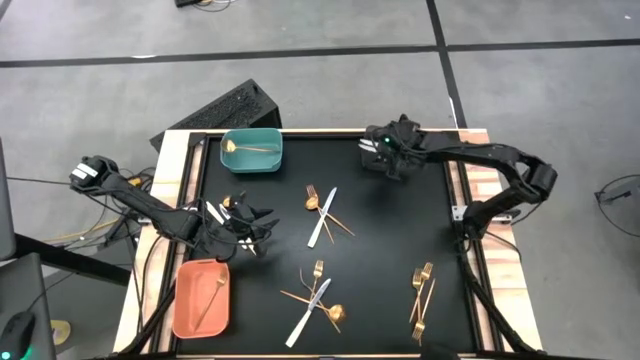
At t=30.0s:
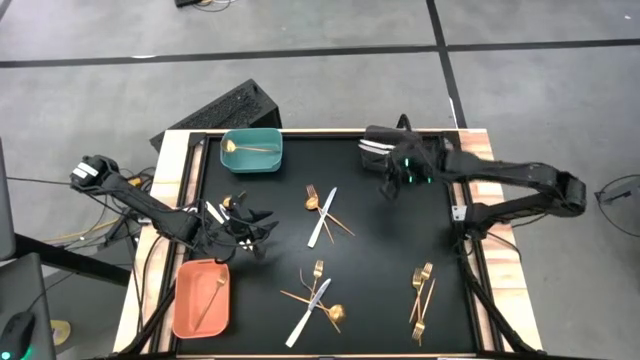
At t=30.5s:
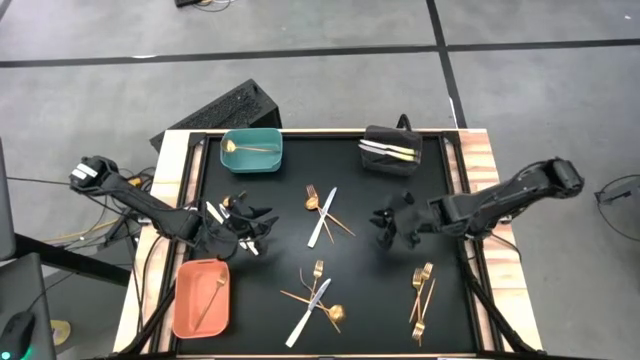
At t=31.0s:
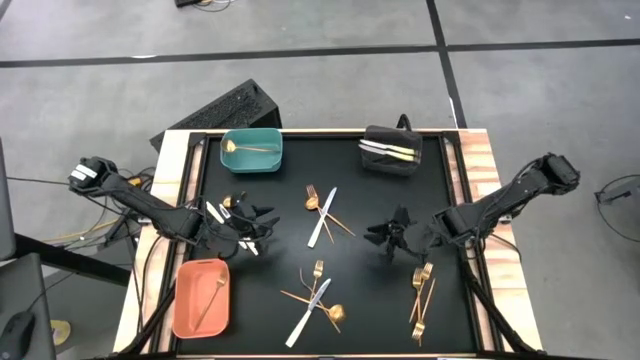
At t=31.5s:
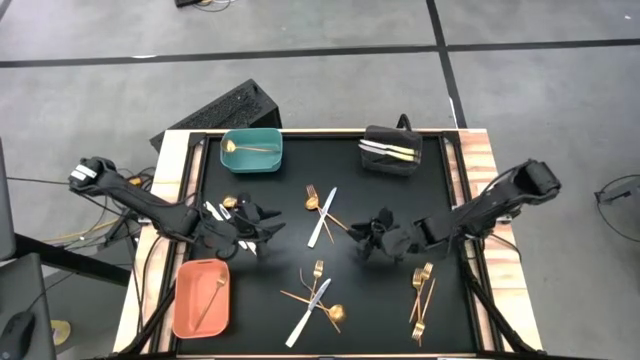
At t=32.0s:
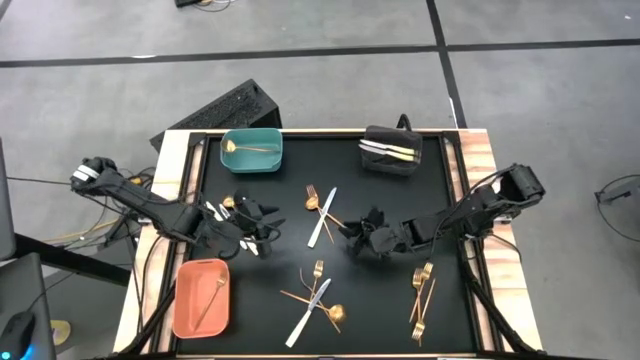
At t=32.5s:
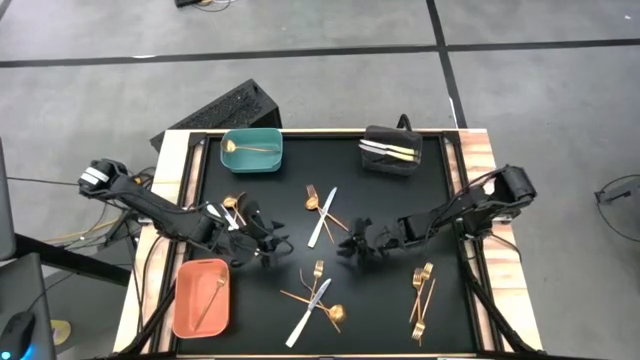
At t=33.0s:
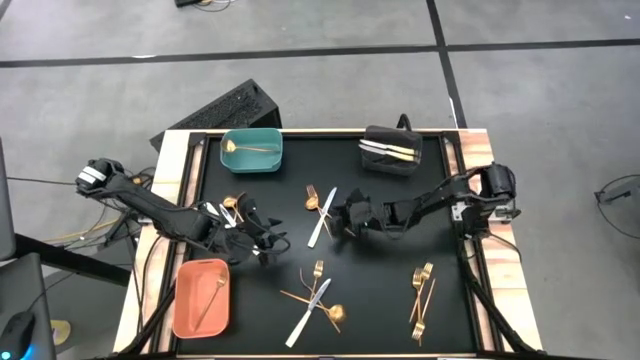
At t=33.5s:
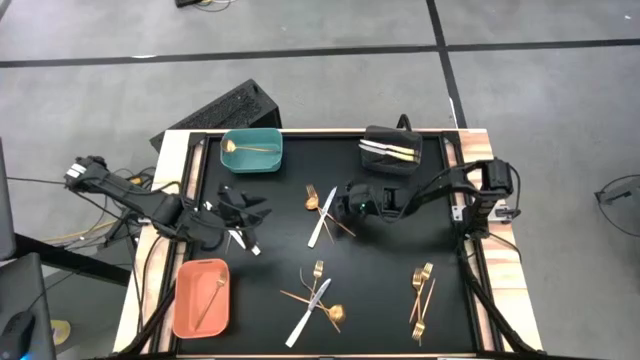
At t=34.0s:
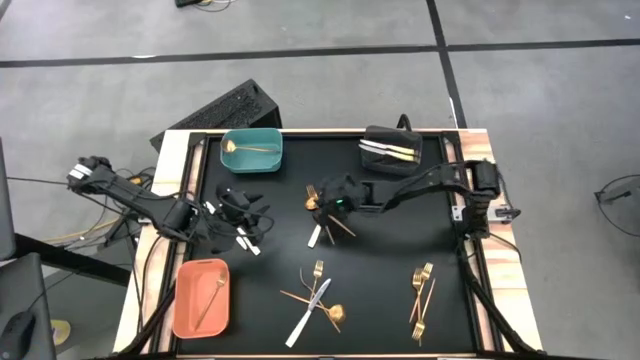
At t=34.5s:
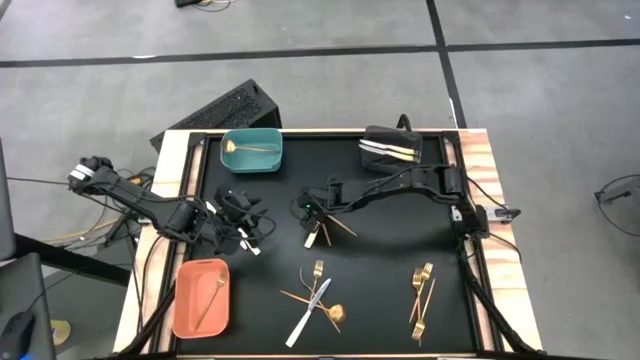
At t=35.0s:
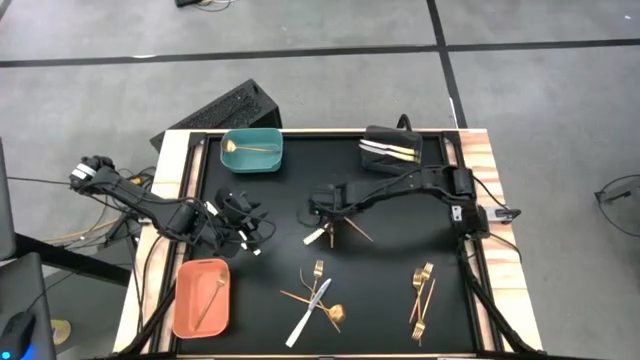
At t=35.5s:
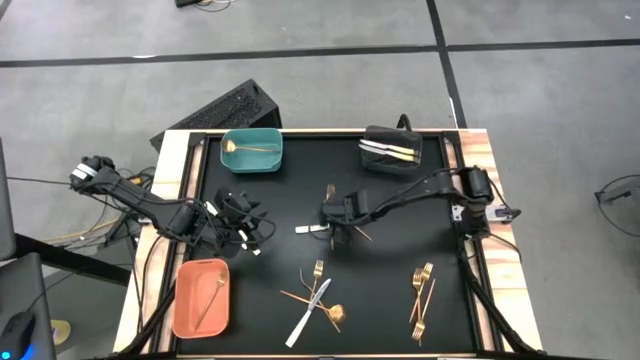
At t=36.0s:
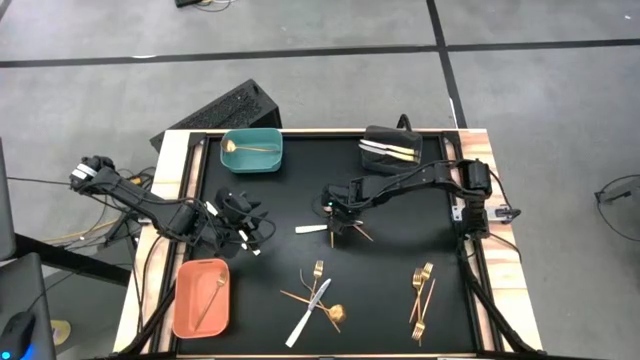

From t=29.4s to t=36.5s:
Task: Sort silverware by color (type)
Put the gold spoon into the green bin

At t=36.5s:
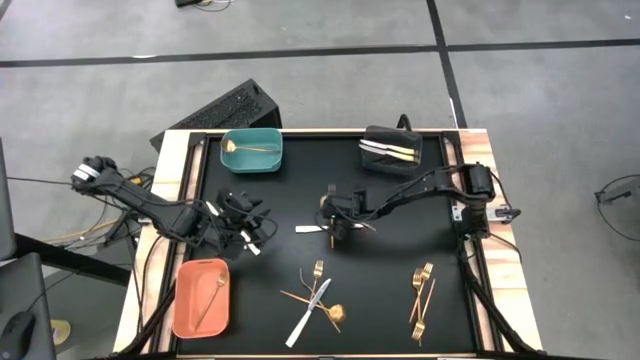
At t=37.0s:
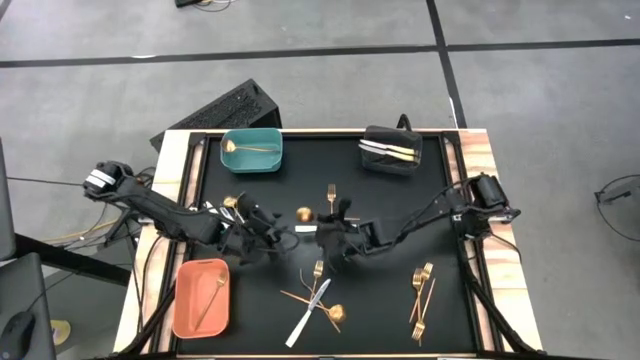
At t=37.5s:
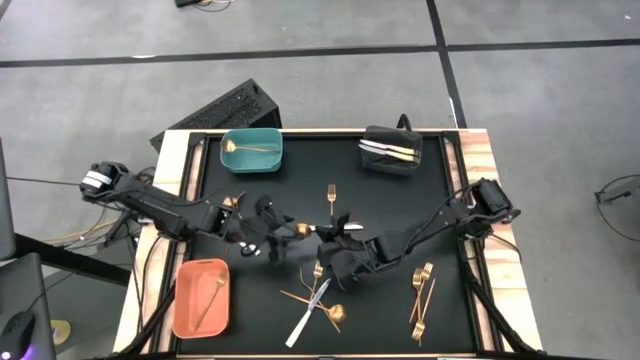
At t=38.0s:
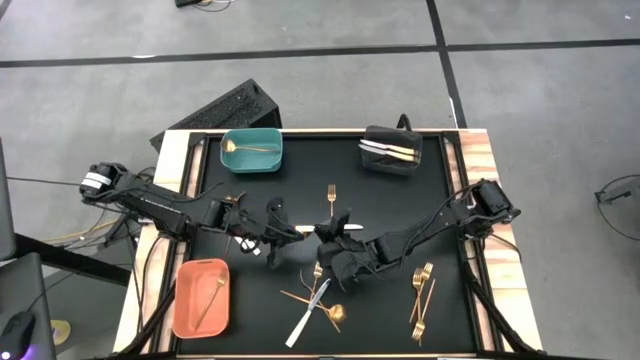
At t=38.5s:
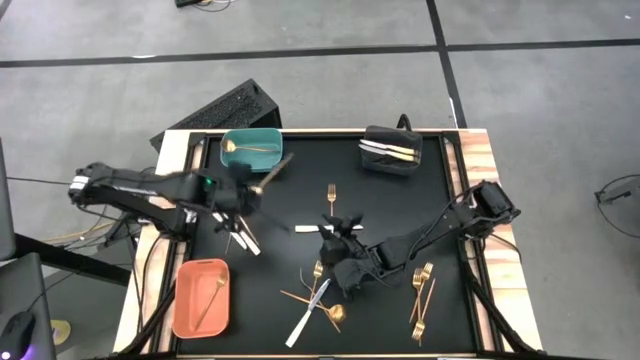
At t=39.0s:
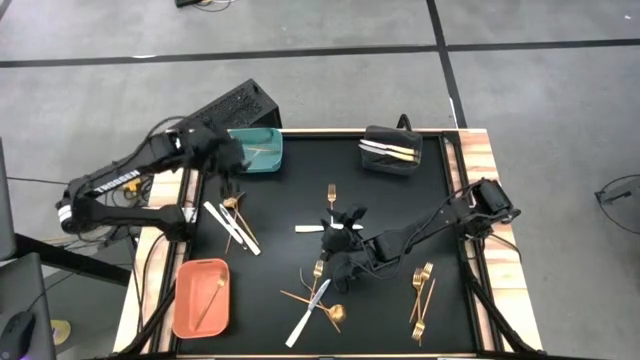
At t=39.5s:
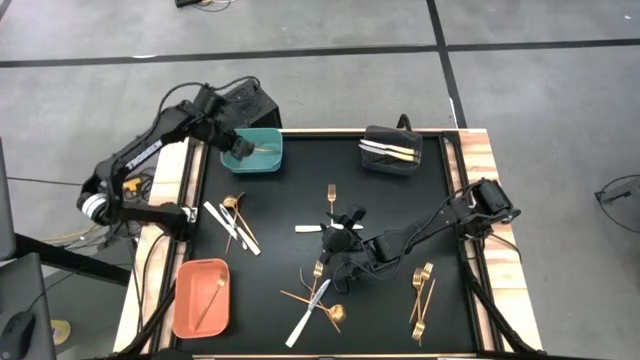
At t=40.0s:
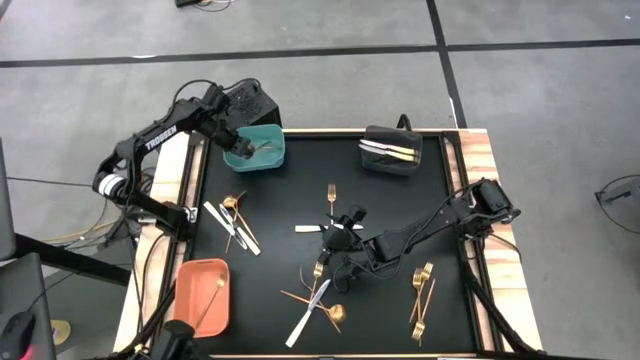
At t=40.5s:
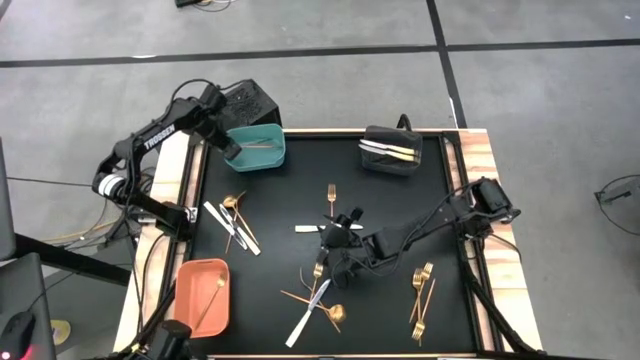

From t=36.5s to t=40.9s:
Put the gold spoon into the green bin

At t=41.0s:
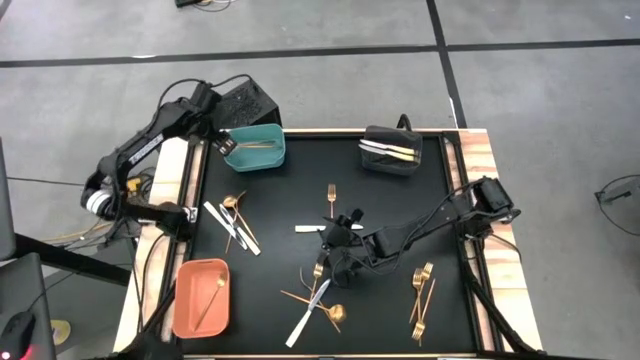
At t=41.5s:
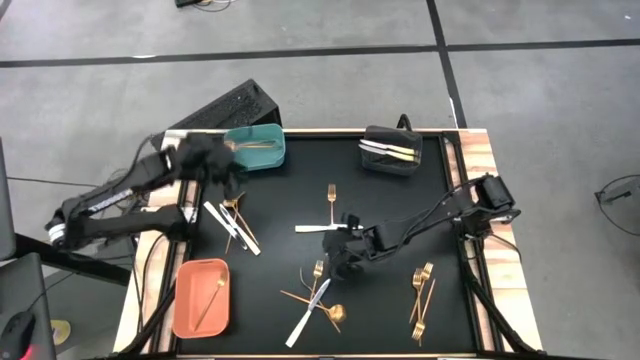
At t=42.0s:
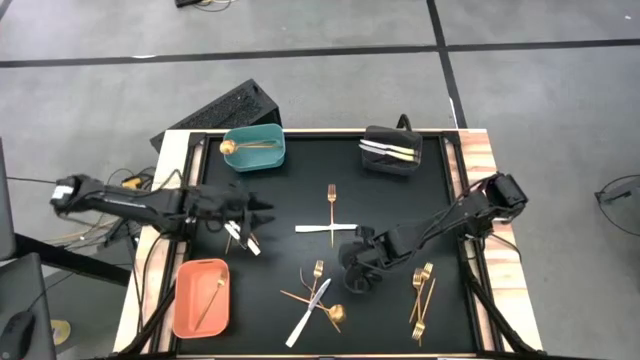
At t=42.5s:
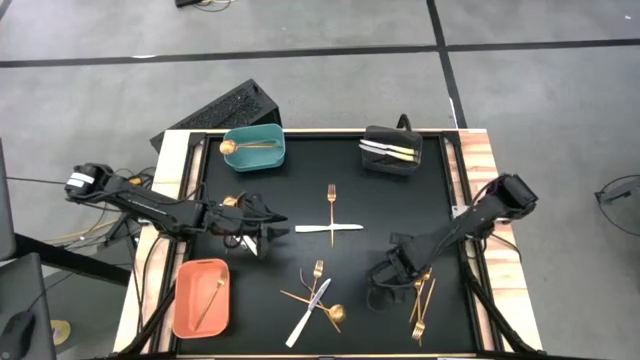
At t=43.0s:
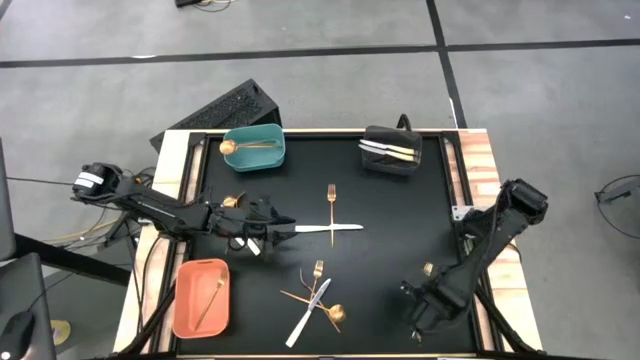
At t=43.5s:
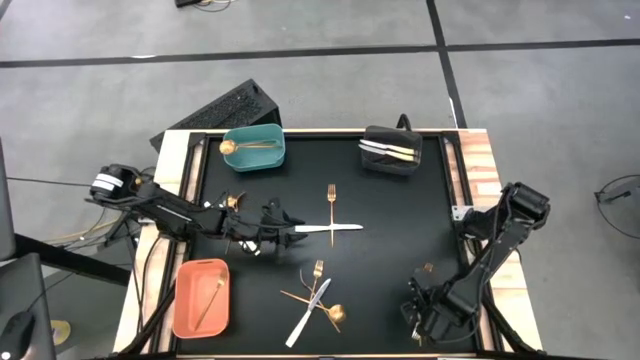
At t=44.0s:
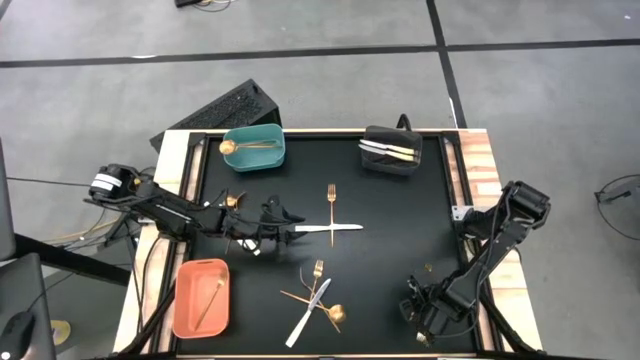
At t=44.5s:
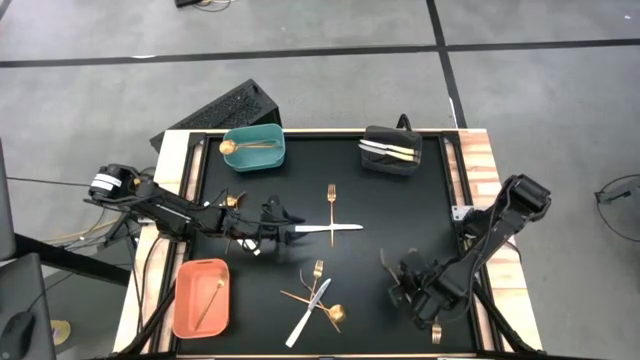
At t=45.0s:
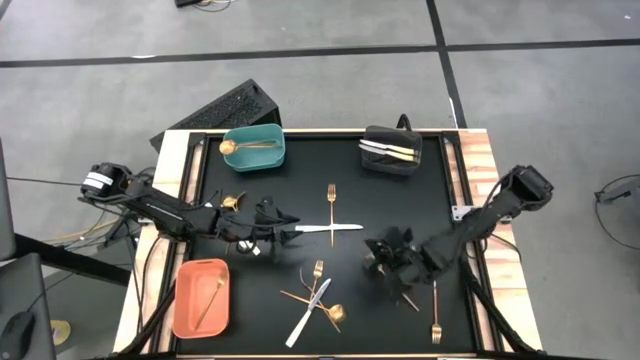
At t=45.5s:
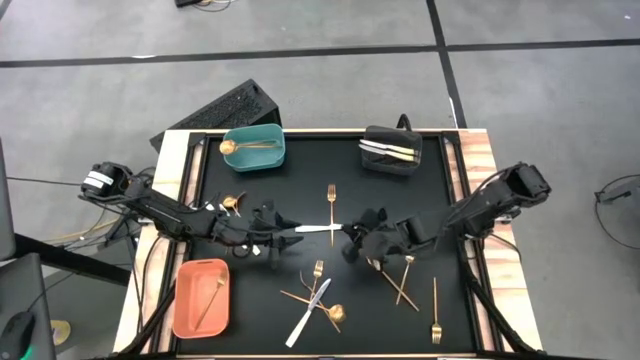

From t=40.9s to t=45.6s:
Put the gold fork into the orange bin

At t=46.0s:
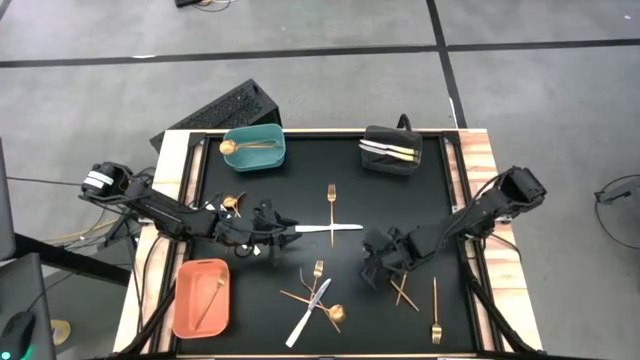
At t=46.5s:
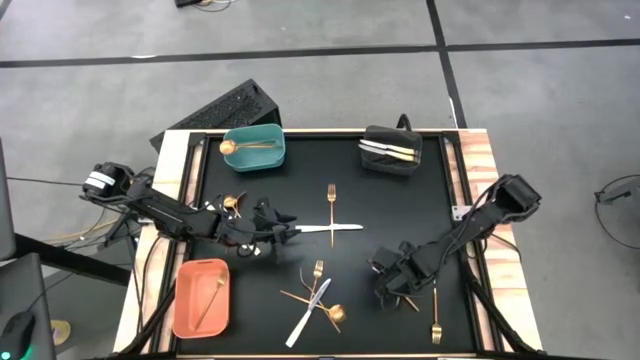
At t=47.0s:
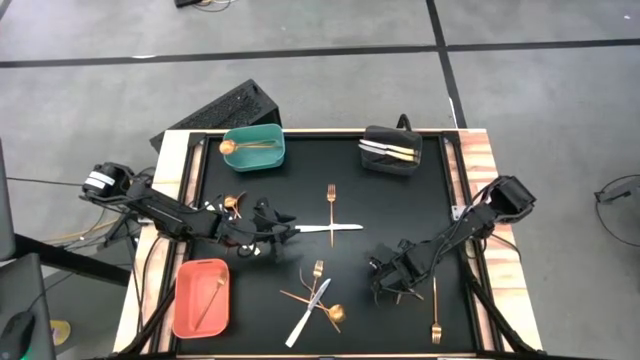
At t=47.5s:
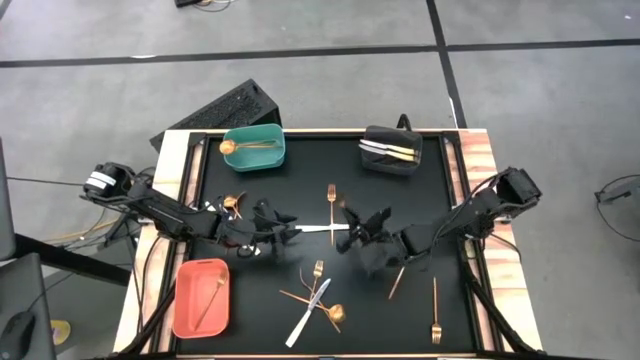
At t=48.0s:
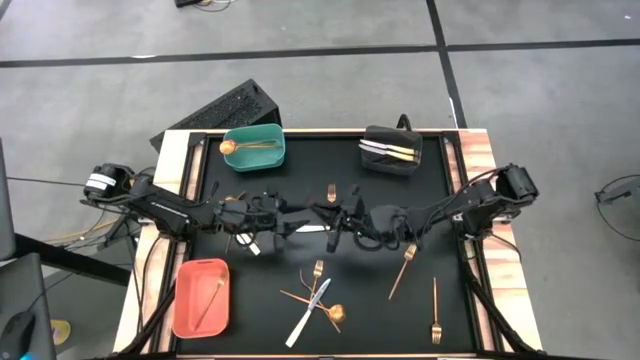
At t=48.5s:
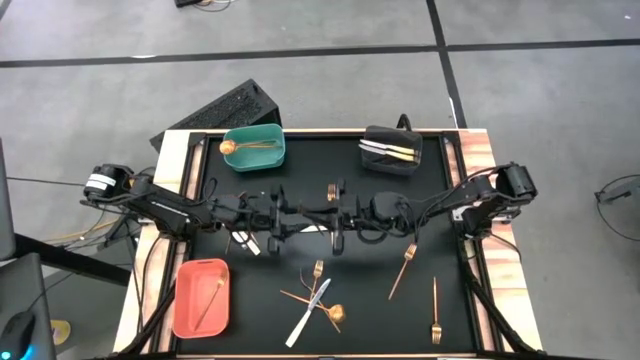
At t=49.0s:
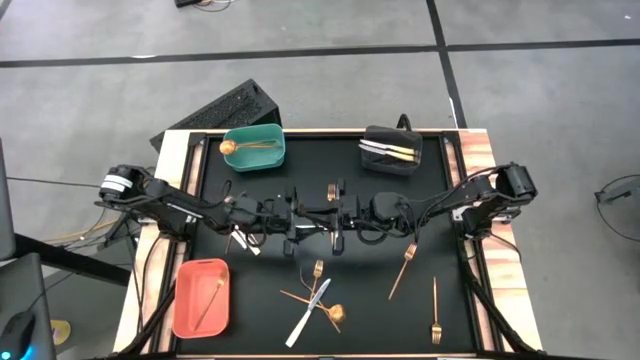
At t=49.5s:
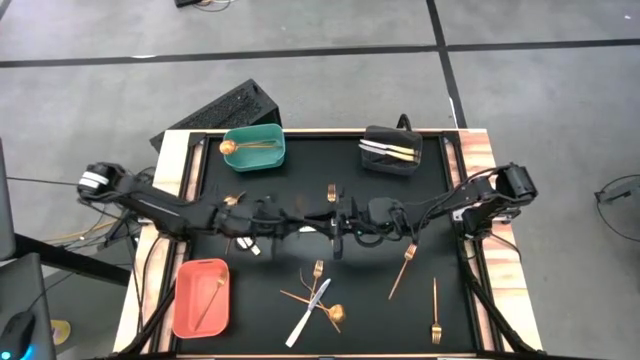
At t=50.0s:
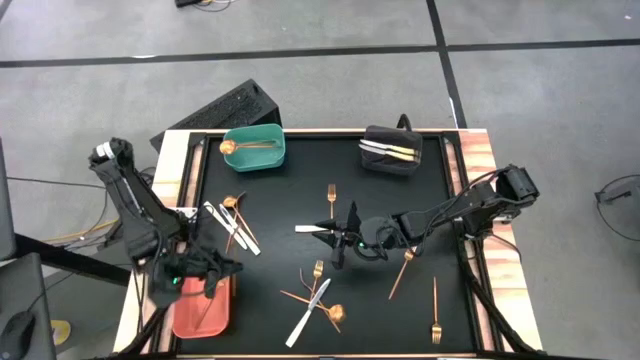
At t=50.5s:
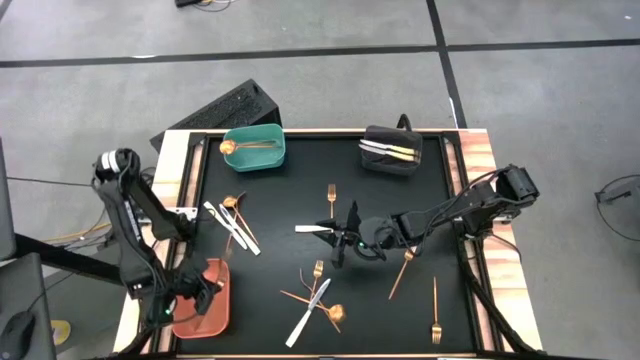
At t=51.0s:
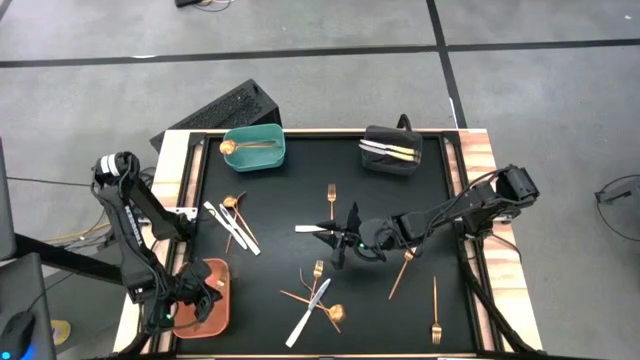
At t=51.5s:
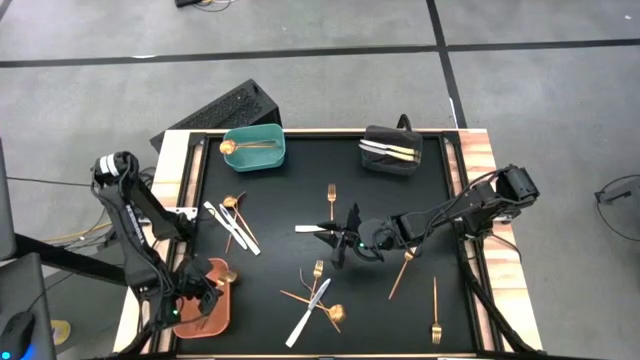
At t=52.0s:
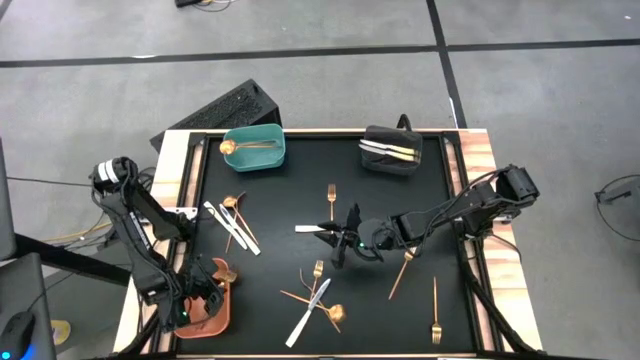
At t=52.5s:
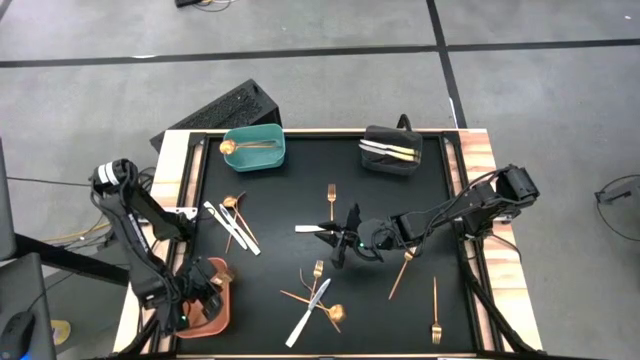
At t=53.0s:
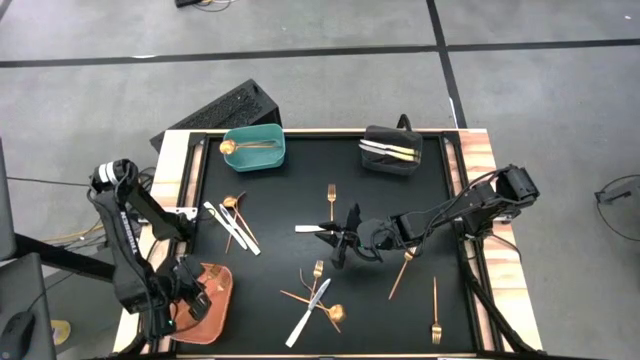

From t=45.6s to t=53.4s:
Put the gold fork into the orange bin
